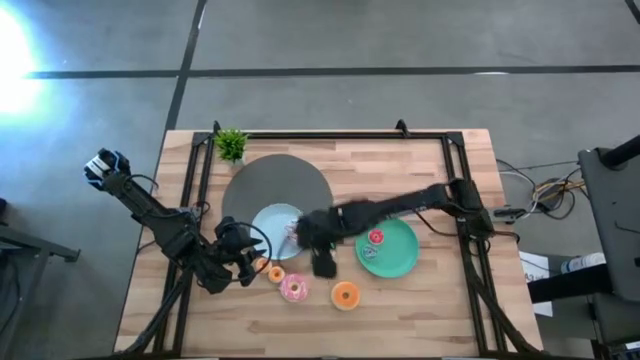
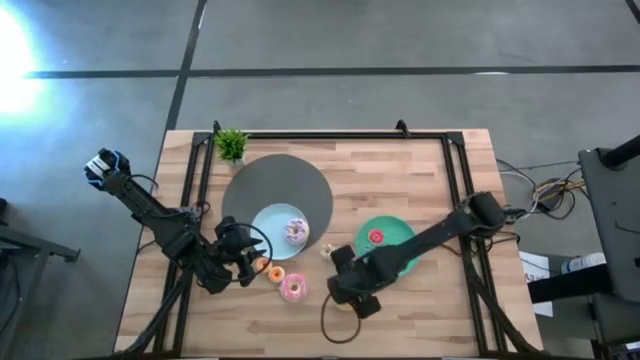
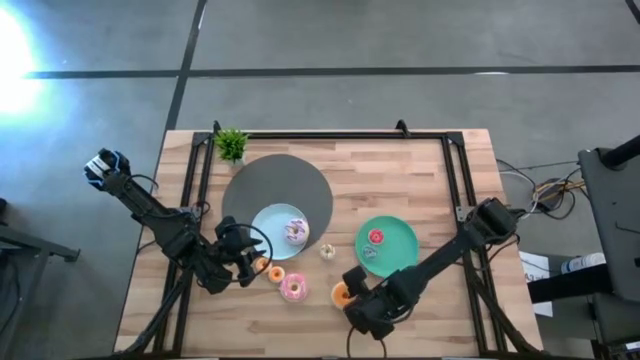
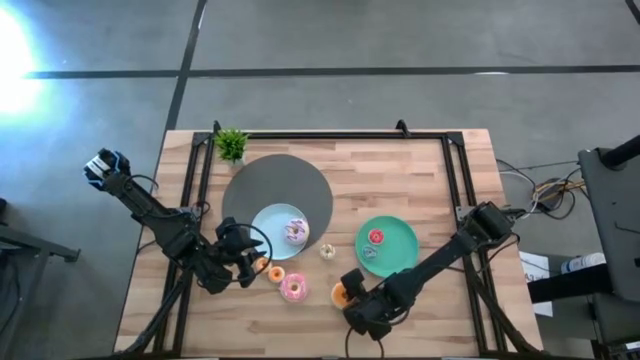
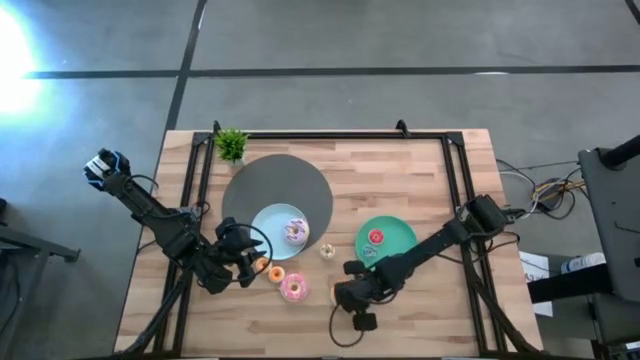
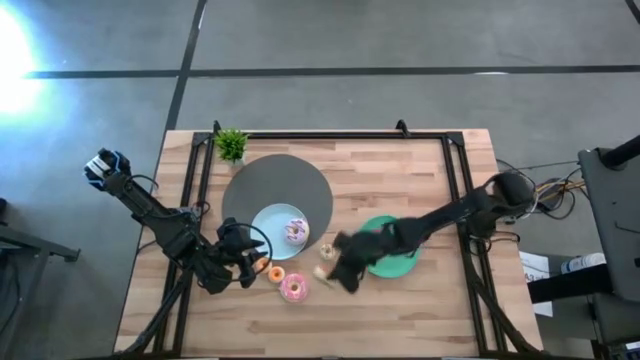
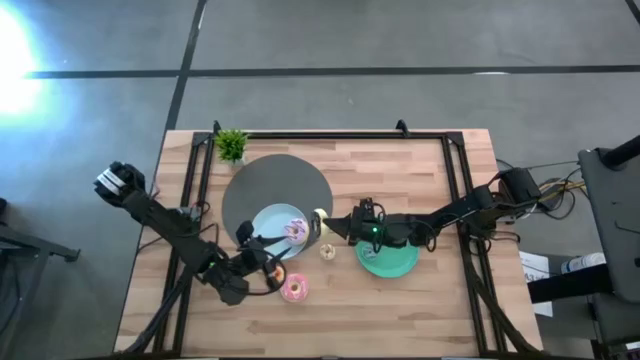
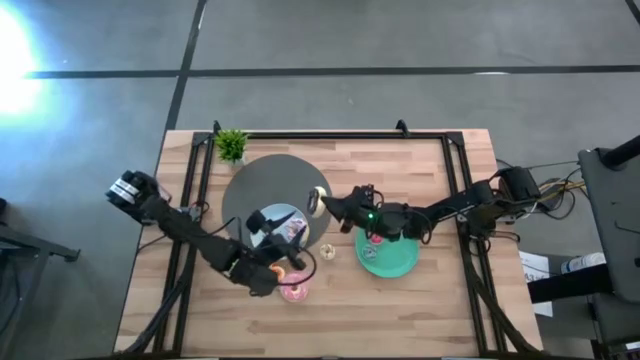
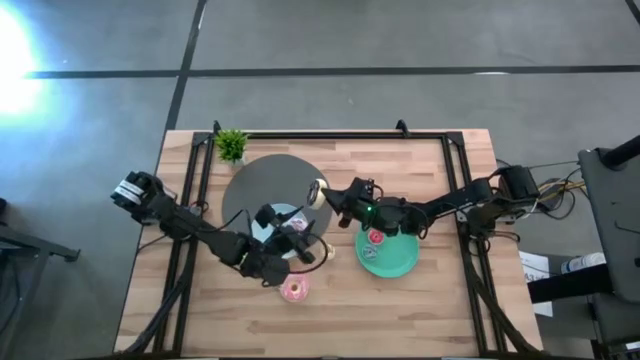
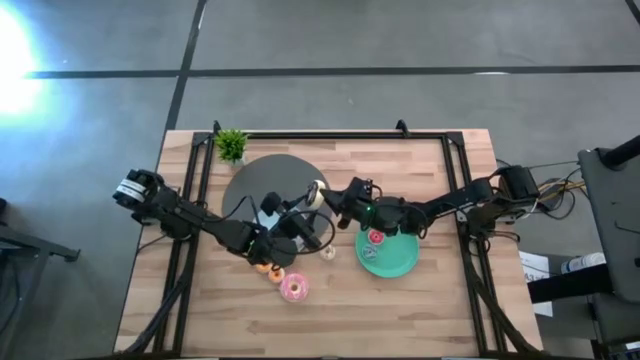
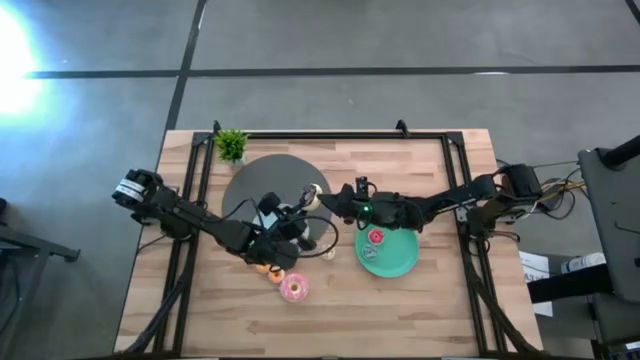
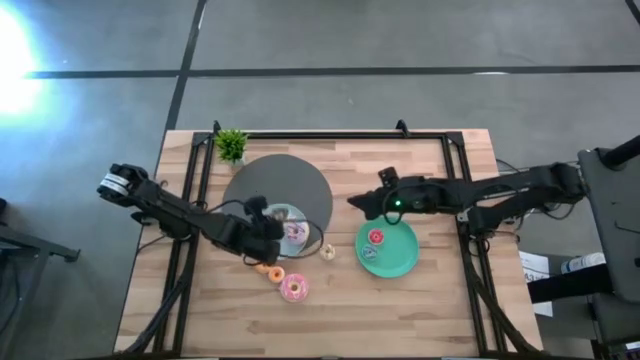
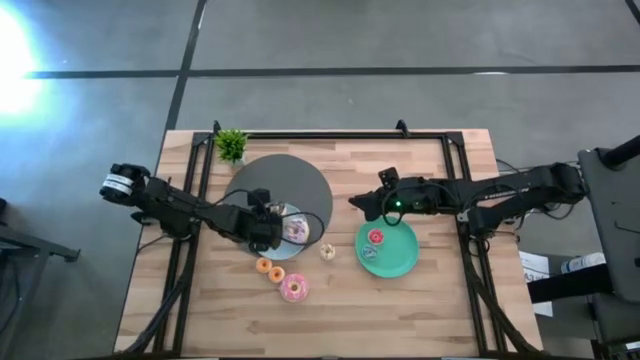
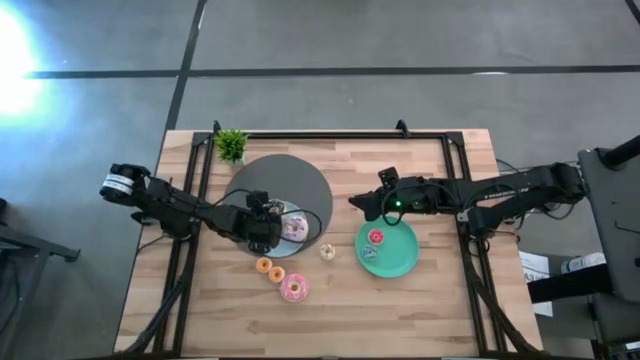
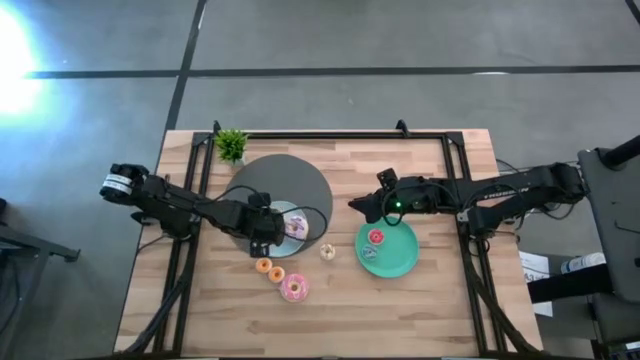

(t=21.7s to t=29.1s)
Task: Pick & Place donuts
Put the big black donut on the white plate

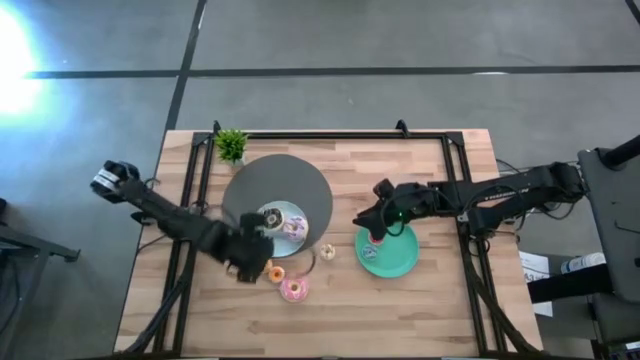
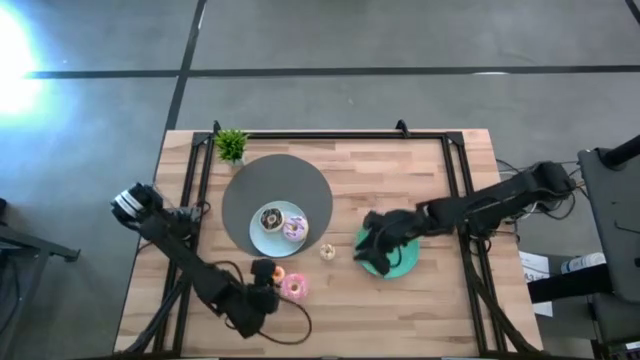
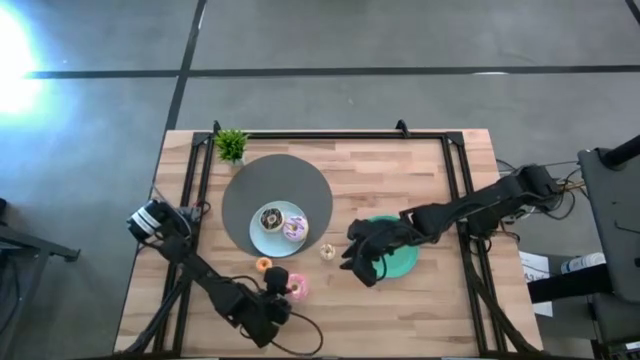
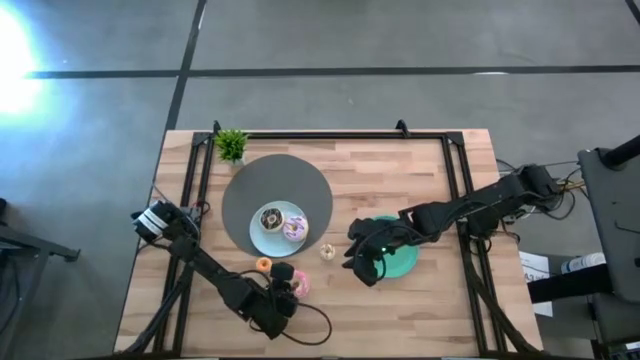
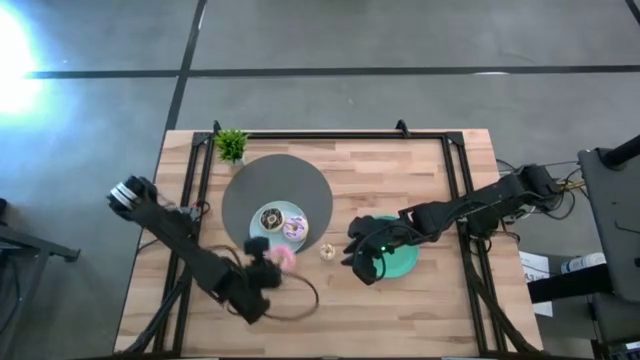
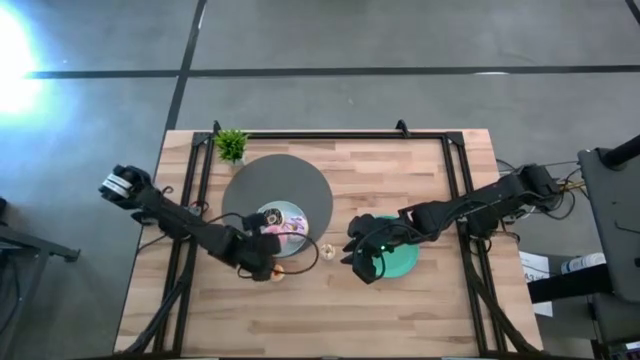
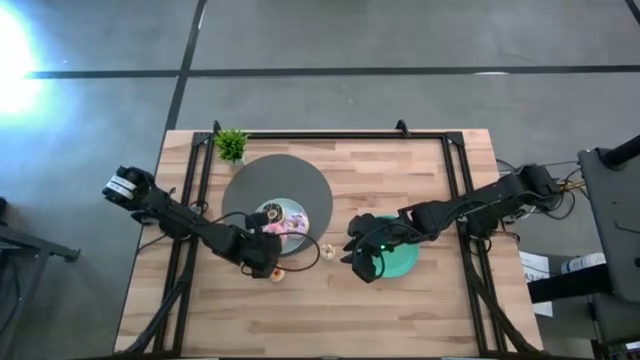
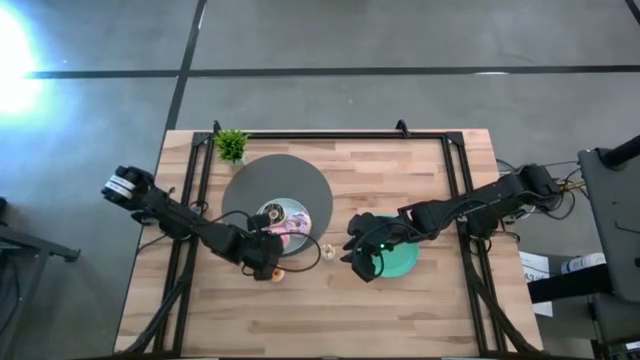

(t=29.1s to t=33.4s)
Put the big pink donut on the white plate

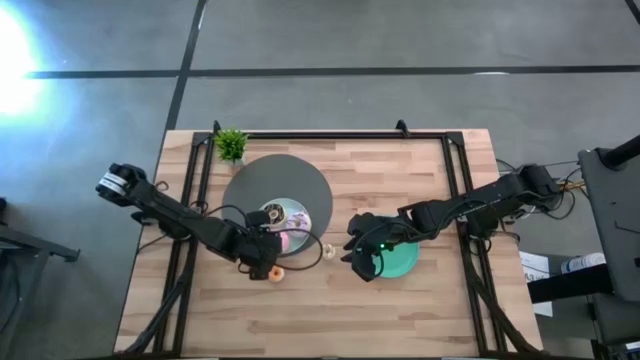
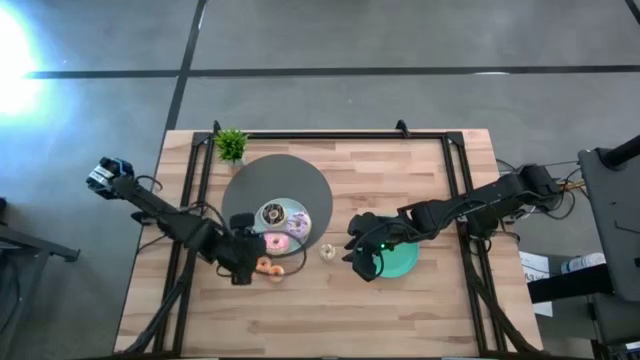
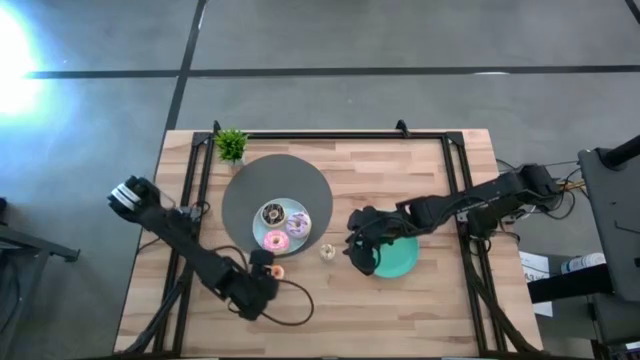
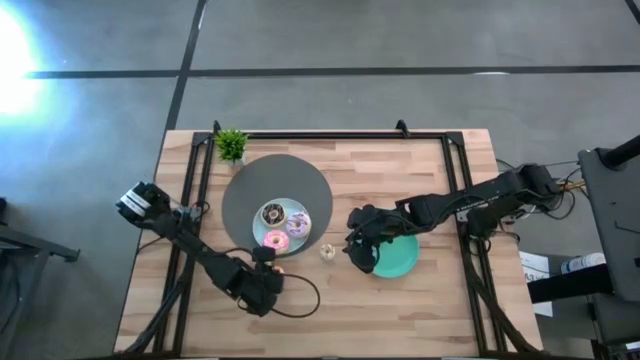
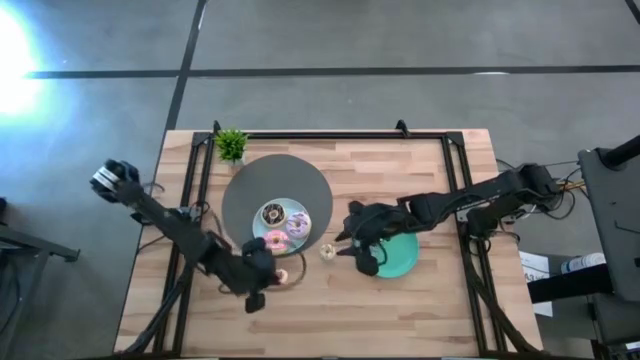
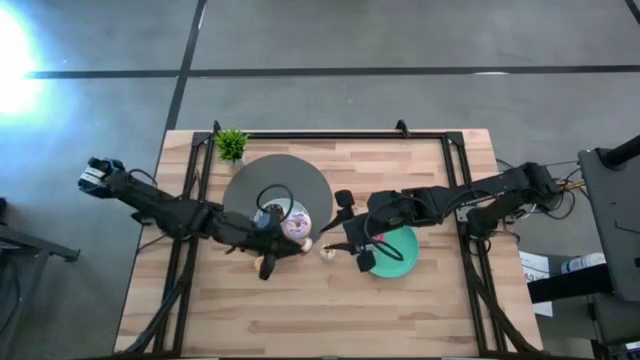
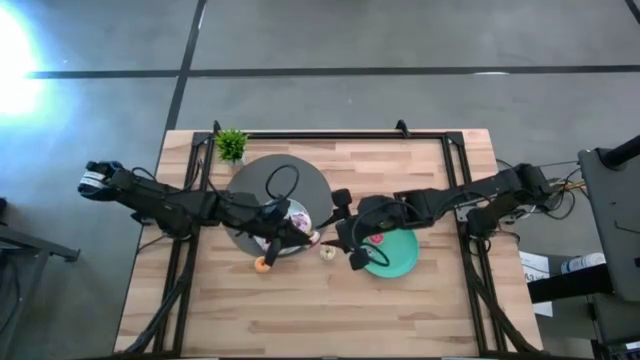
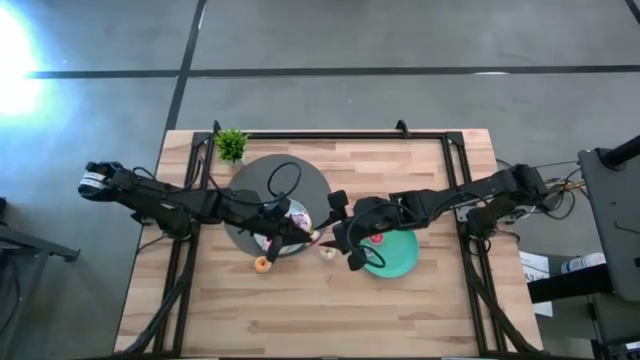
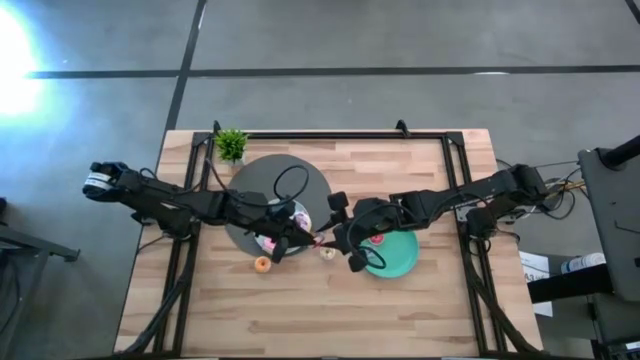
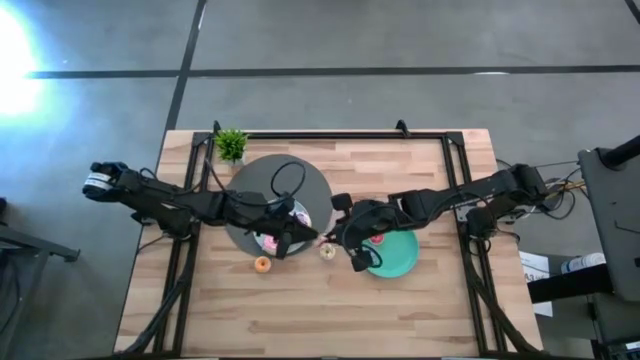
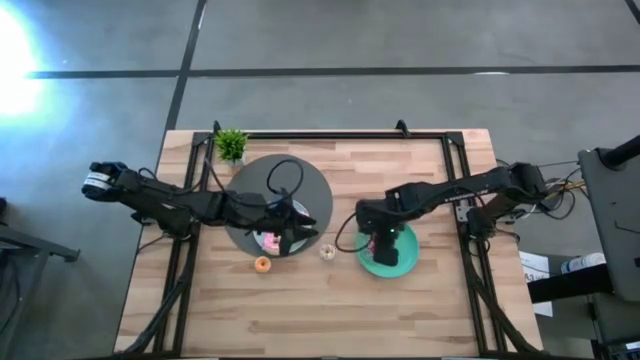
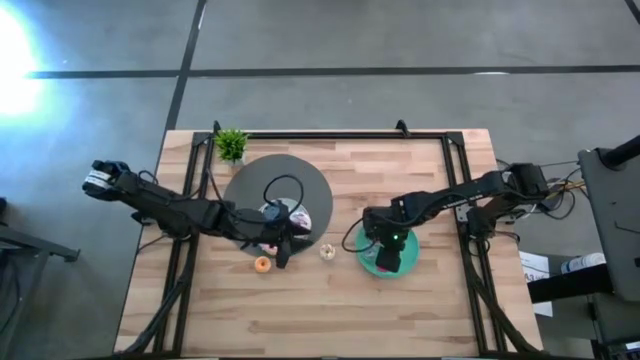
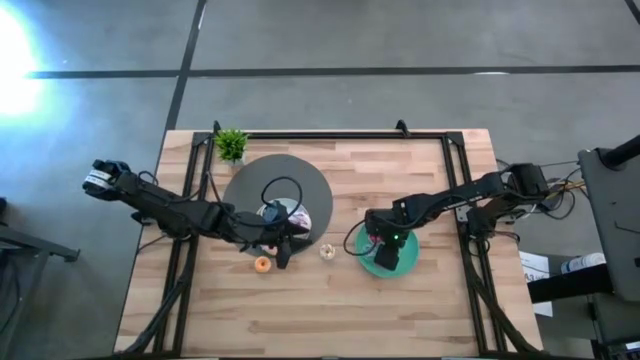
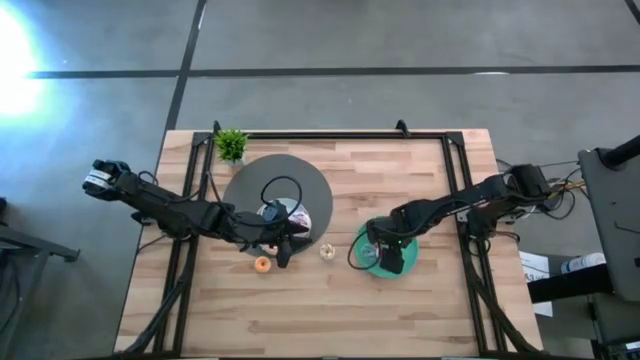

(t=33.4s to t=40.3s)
Put the small red donut on the green plate

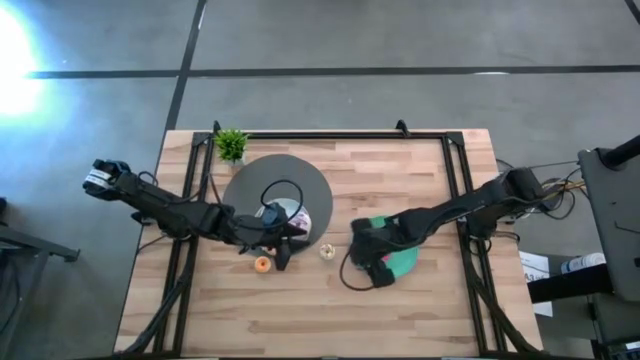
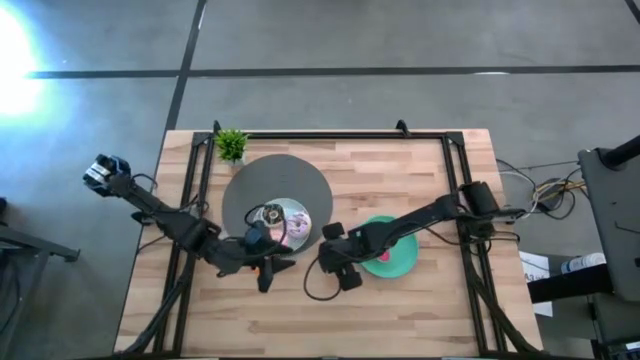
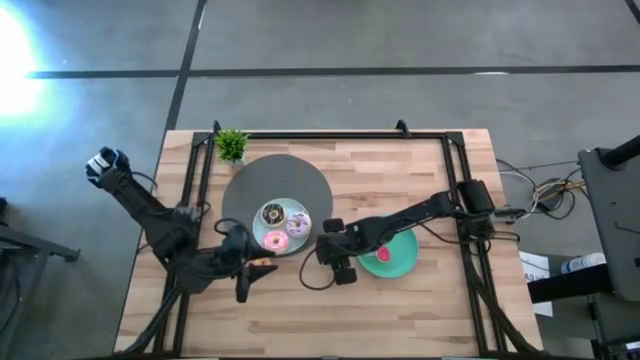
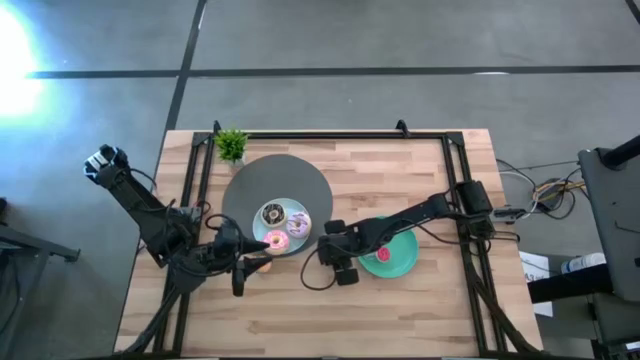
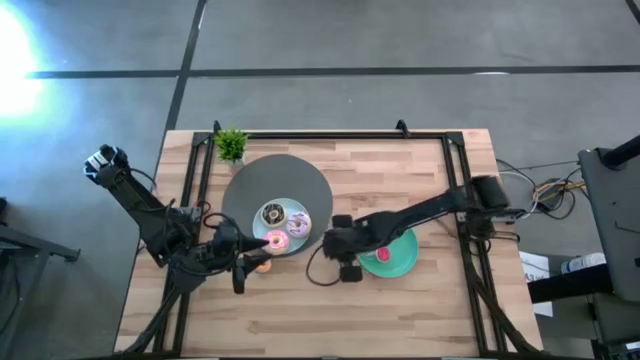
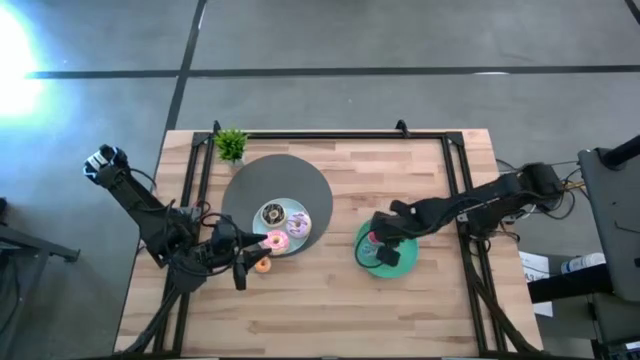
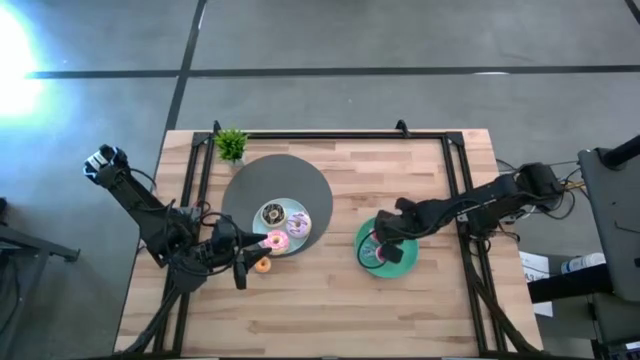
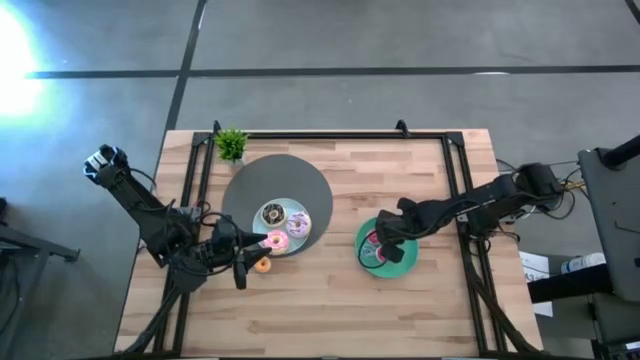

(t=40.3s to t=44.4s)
Put the small white donut on the green plate
